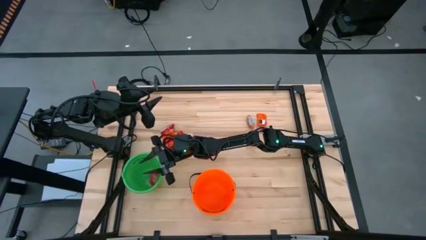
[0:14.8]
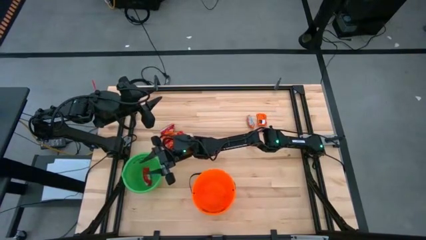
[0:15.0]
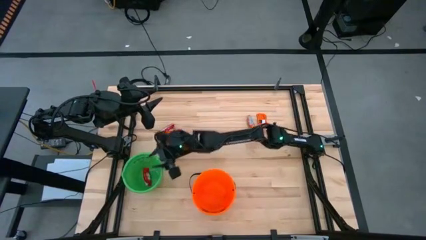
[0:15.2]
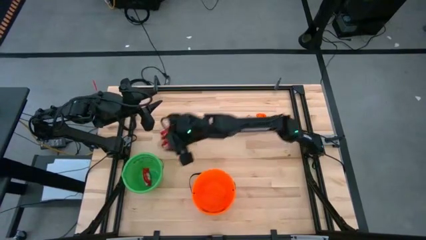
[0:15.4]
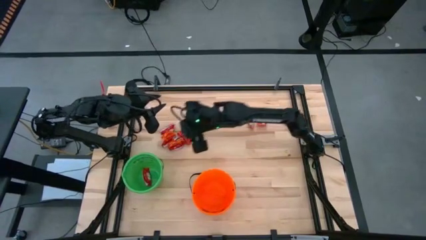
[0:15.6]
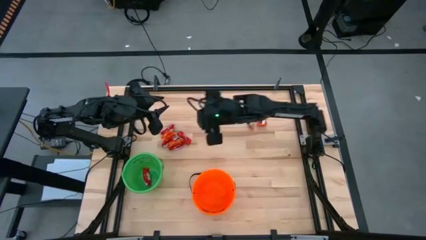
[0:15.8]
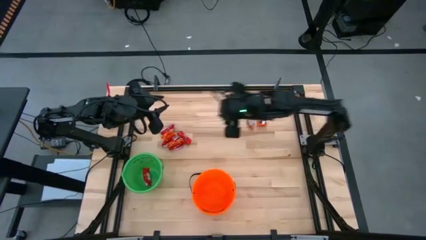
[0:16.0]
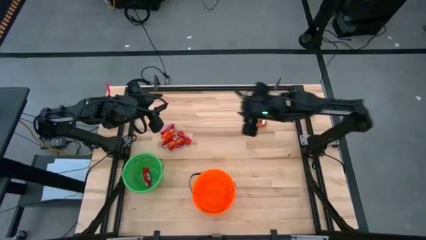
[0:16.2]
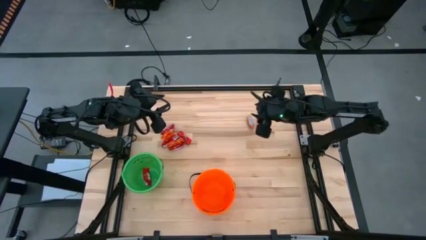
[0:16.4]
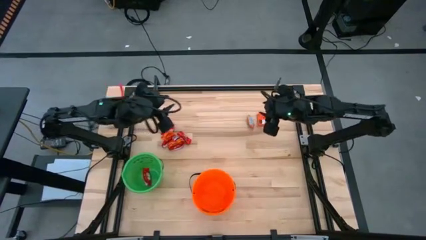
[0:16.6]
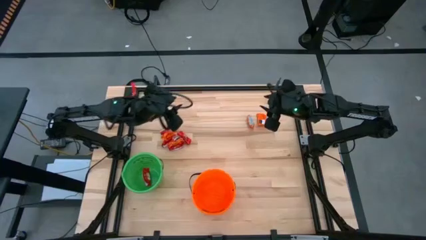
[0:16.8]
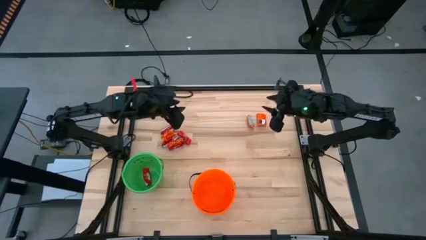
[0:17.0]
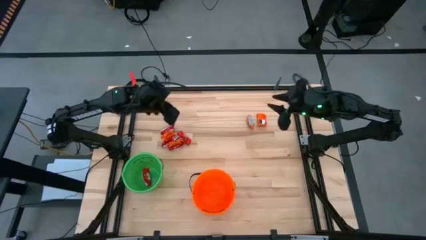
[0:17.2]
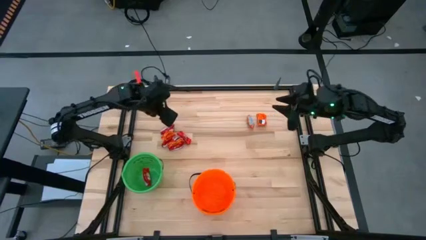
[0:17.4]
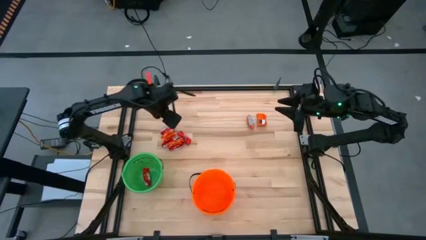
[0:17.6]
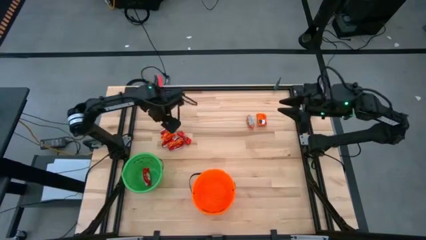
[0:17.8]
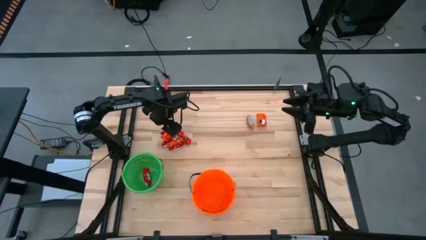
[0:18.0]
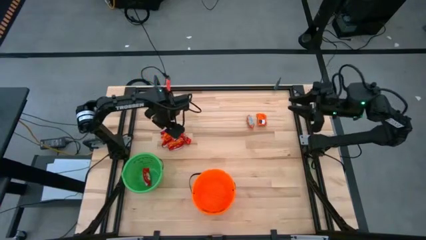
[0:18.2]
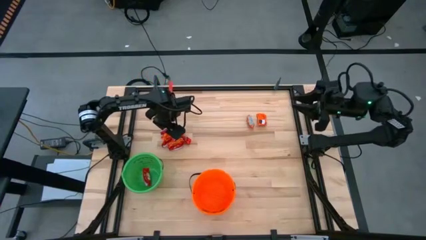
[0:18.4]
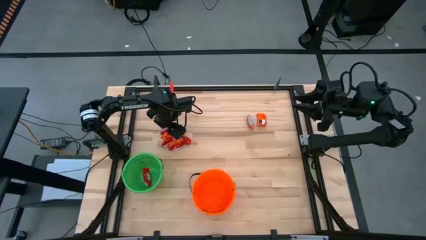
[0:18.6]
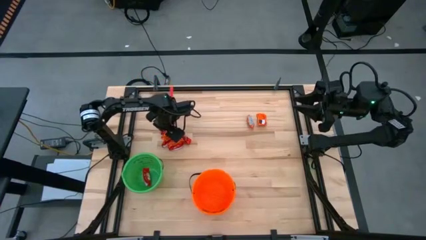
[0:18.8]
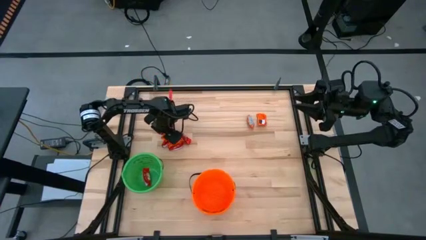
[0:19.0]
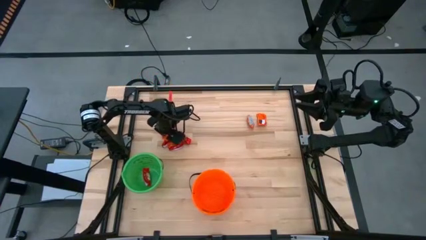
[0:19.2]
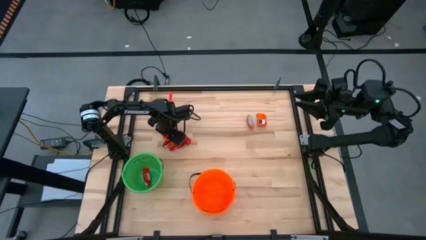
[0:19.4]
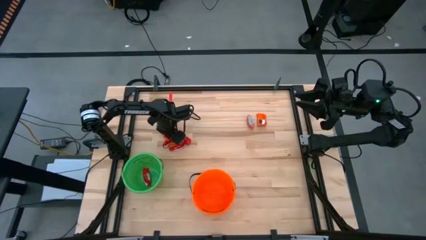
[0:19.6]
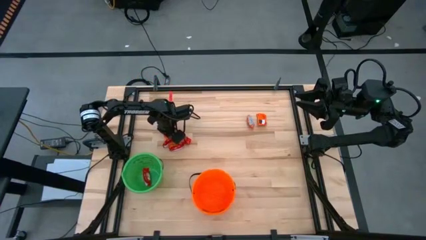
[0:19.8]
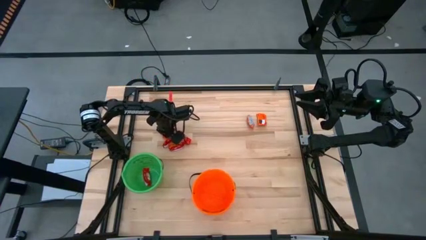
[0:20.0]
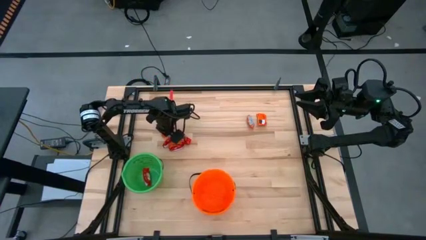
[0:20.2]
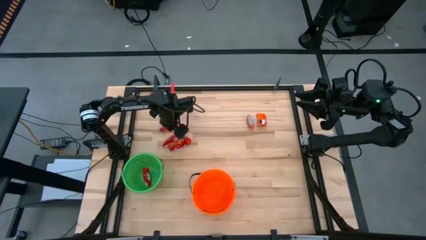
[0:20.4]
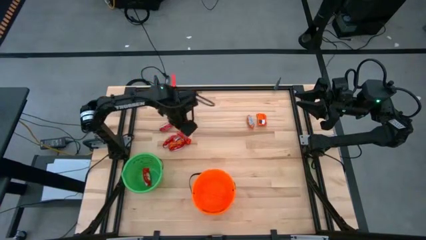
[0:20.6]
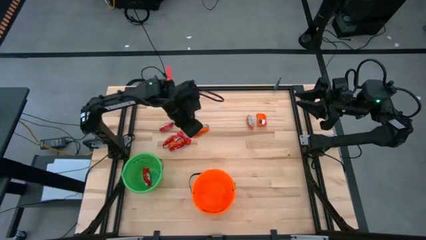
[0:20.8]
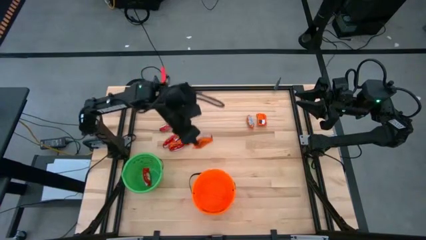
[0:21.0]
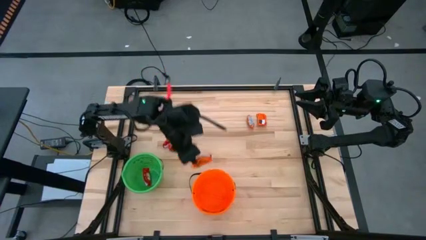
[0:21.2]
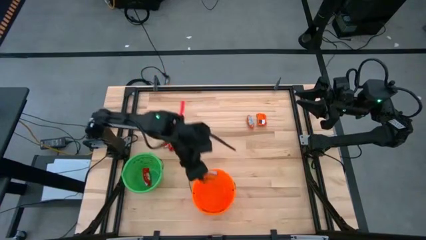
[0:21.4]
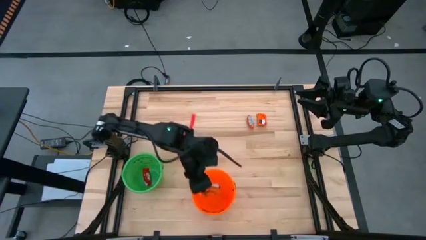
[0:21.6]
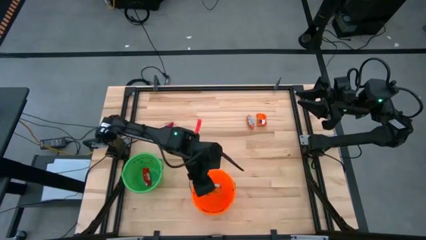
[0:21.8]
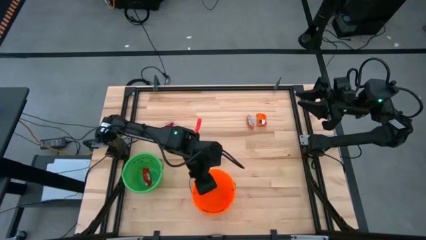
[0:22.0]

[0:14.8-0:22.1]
Put the orange chocolate into the orange bucket

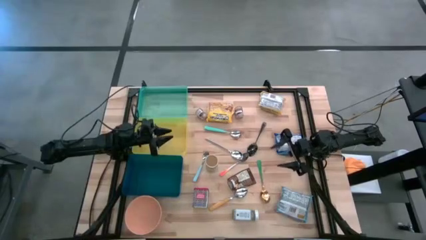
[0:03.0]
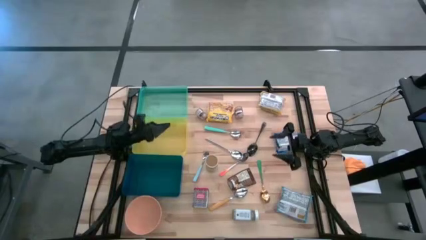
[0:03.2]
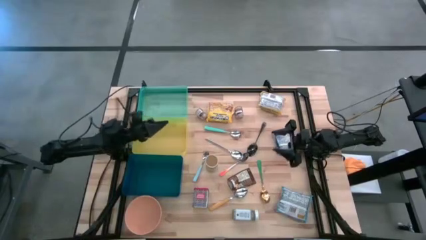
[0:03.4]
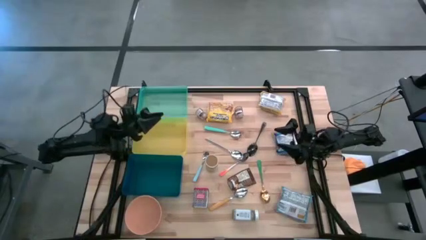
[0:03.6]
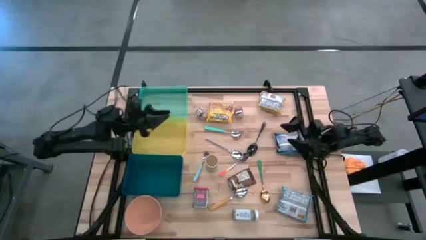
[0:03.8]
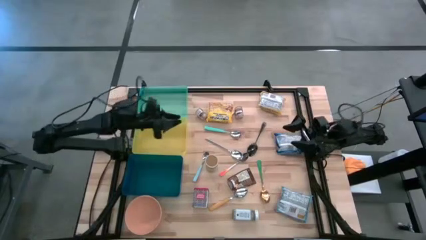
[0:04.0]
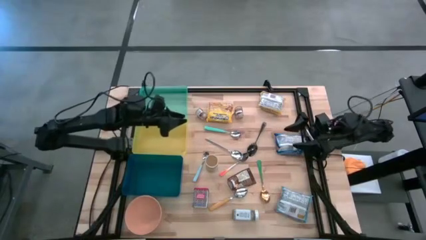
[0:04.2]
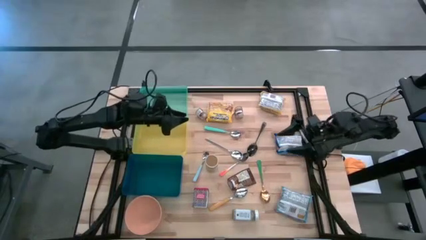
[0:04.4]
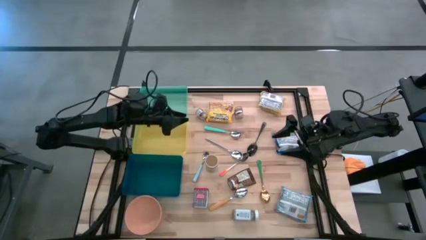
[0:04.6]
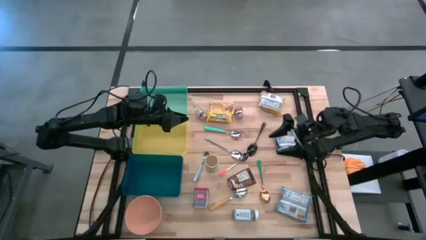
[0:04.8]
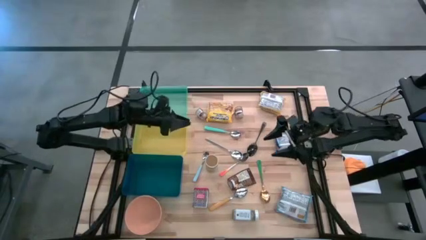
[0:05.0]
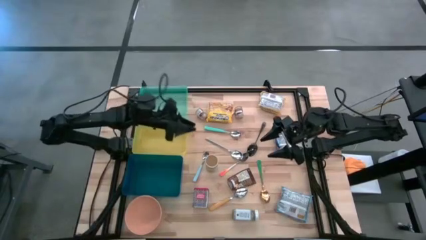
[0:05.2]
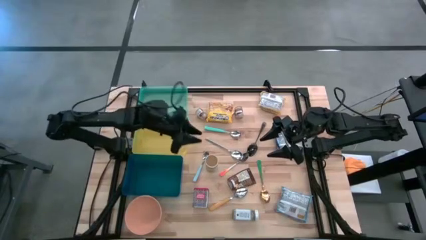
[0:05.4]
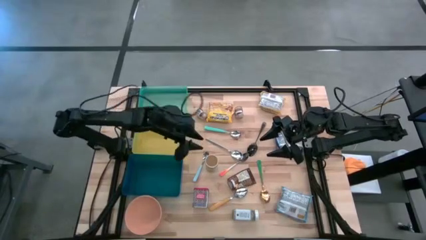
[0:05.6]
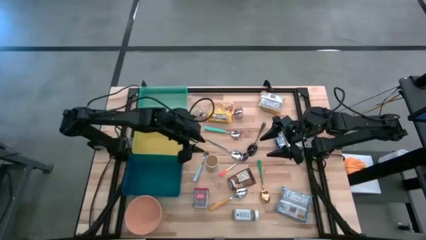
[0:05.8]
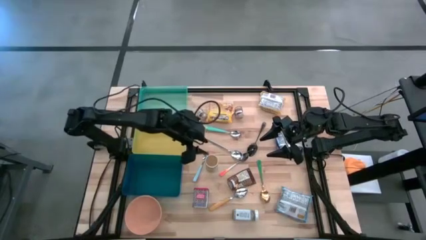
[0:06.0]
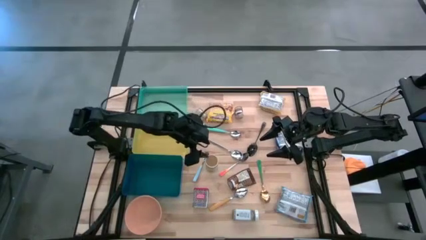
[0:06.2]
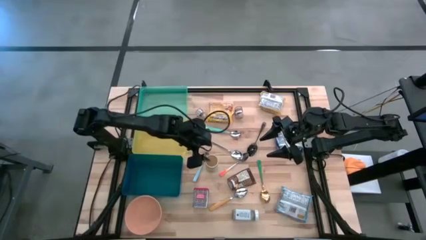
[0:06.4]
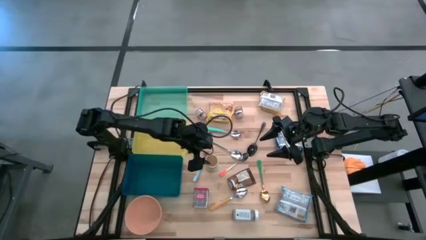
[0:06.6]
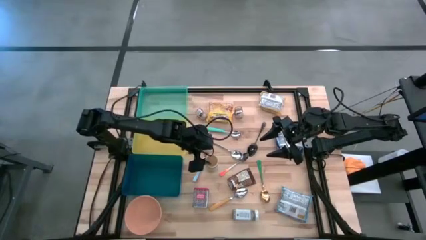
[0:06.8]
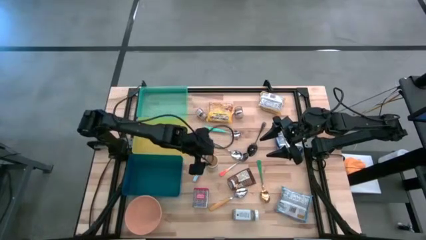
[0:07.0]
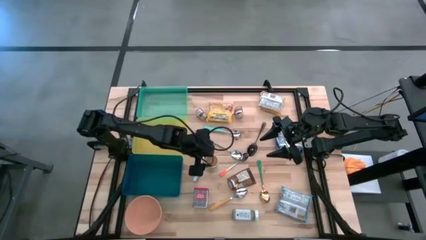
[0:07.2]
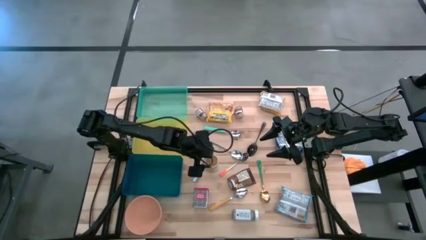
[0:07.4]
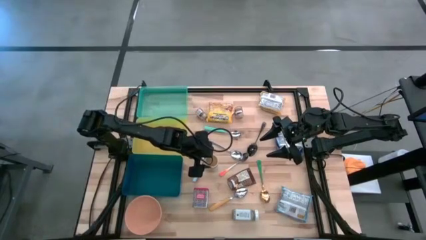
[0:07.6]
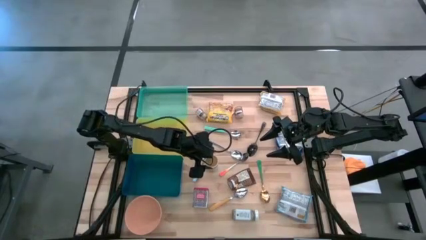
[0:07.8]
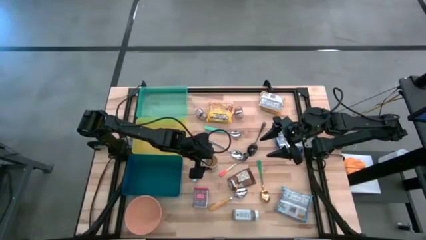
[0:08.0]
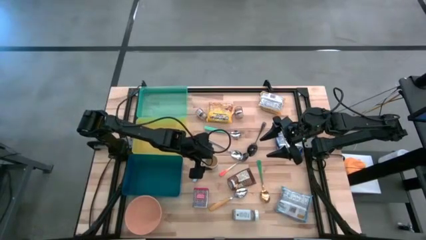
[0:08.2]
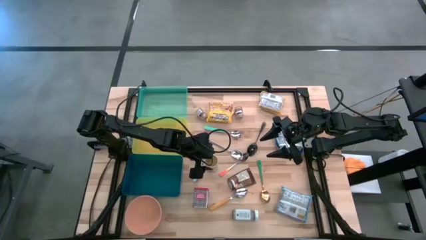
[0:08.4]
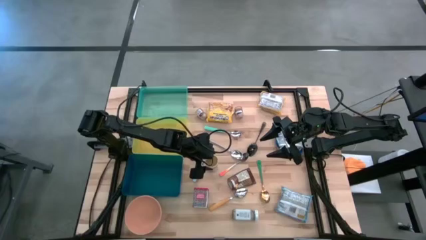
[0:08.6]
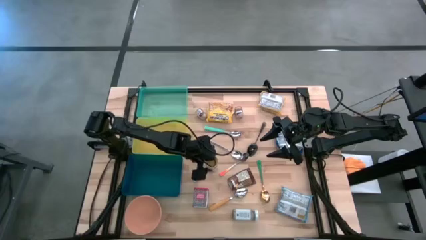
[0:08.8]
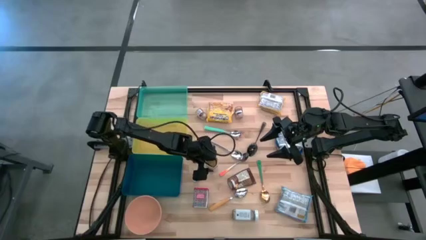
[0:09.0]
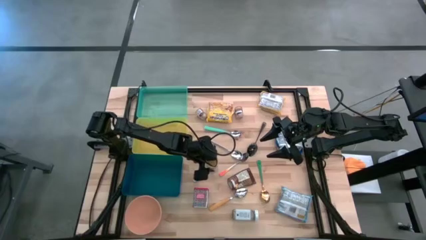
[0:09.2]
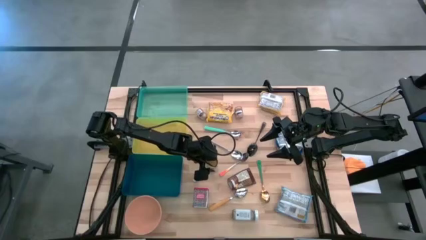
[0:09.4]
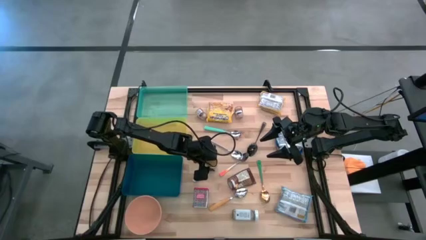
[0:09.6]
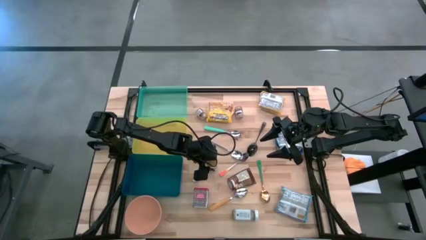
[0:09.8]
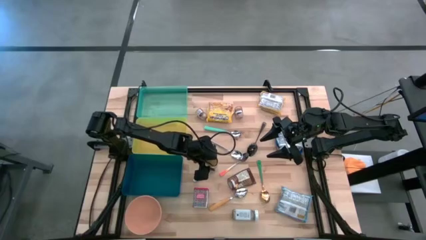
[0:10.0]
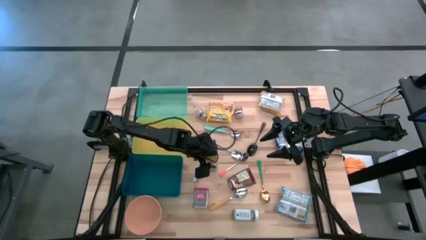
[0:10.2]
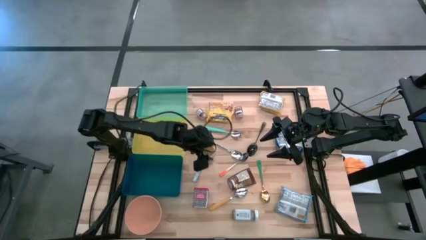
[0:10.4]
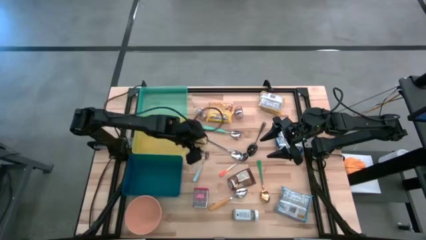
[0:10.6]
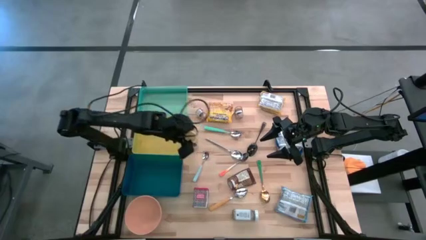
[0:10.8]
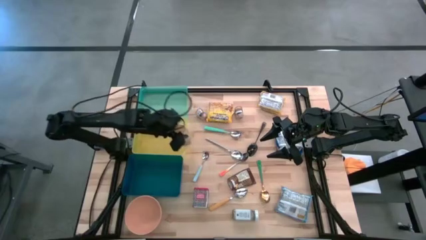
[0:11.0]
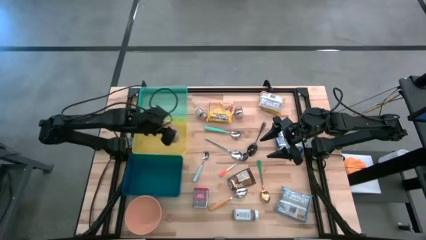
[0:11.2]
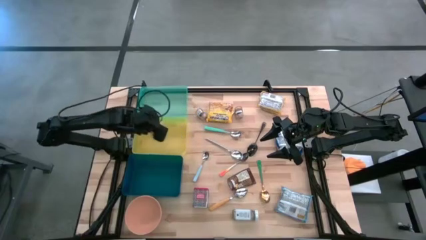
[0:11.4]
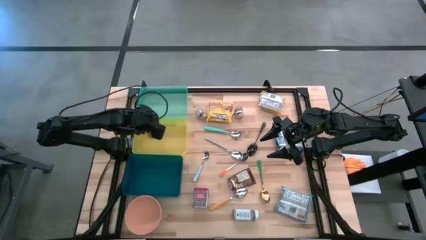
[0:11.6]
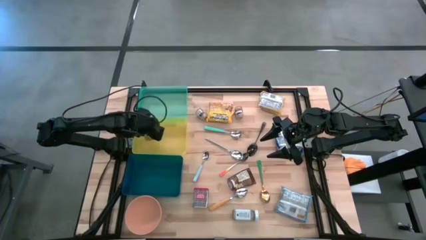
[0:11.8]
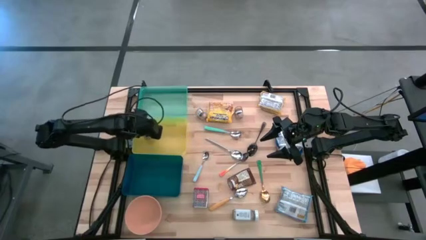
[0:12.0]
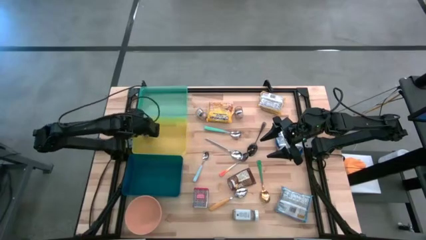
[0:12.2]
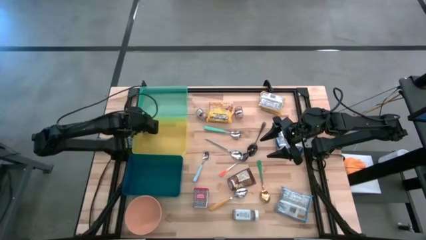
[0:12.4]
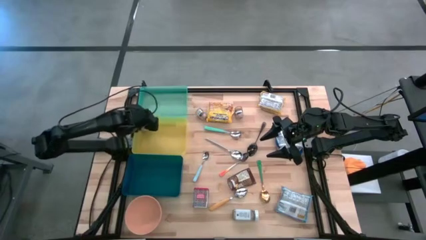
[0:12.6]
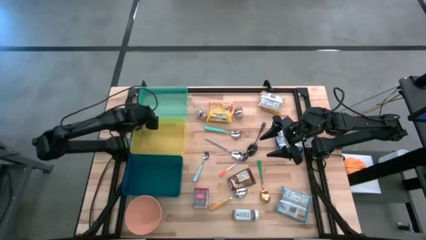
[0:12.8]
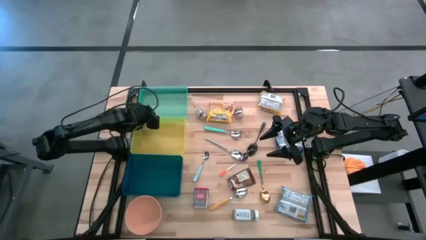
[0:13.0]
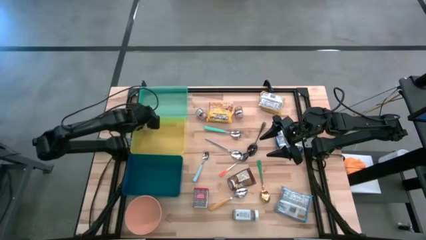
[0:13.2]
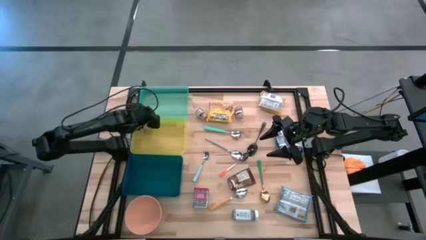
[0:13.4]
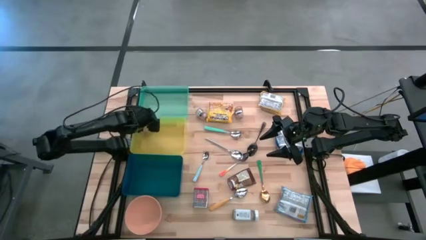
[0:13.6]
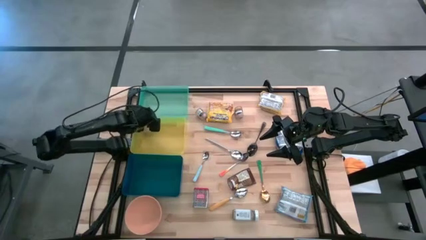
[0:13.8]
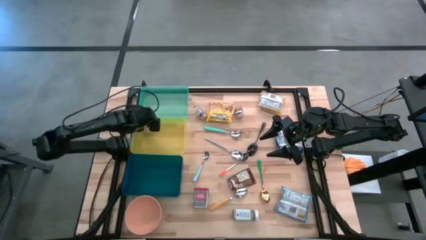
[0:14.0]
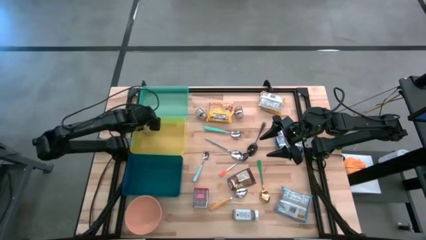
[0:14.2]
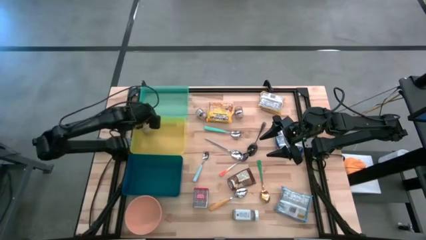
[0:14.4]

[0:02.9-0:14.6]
Put the gold seasoning bottle into the yellow bin
